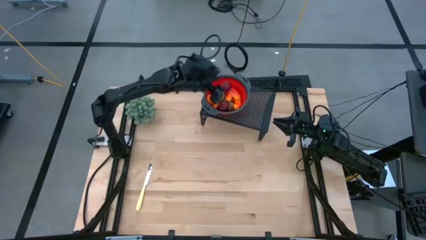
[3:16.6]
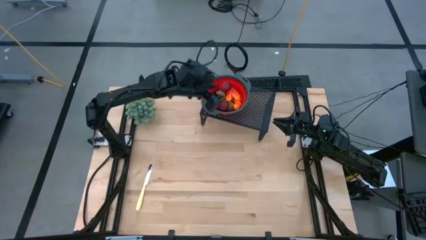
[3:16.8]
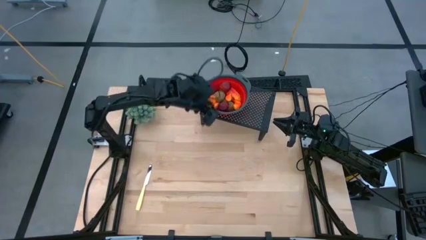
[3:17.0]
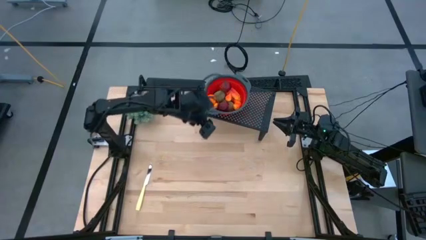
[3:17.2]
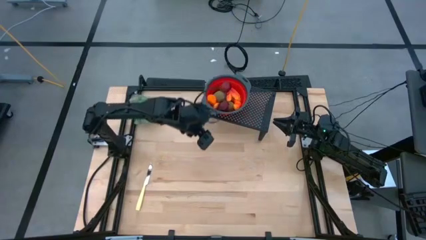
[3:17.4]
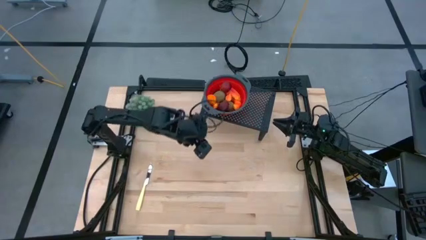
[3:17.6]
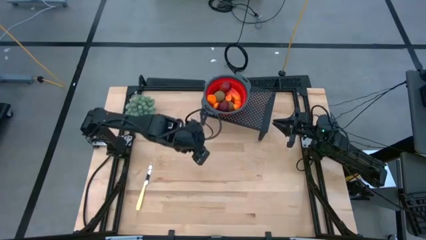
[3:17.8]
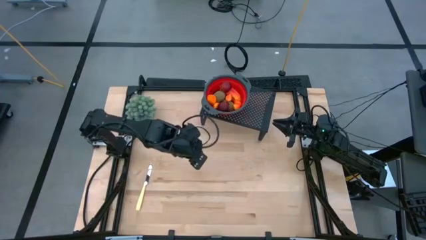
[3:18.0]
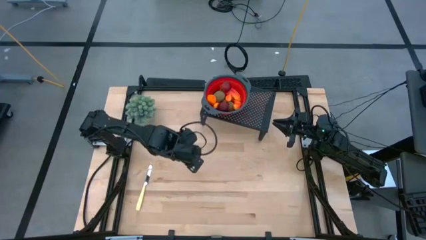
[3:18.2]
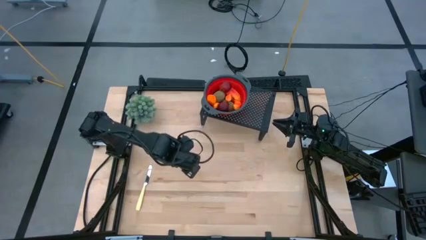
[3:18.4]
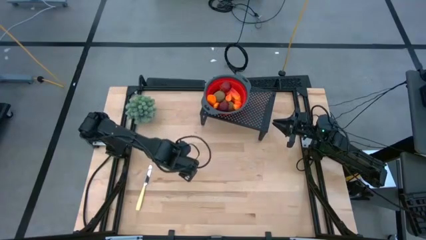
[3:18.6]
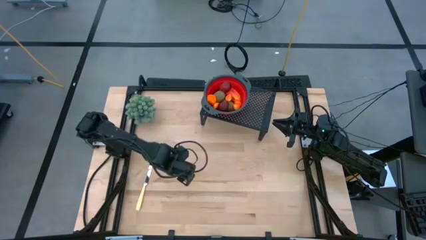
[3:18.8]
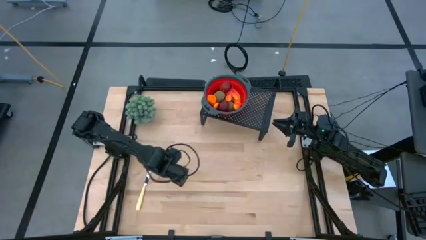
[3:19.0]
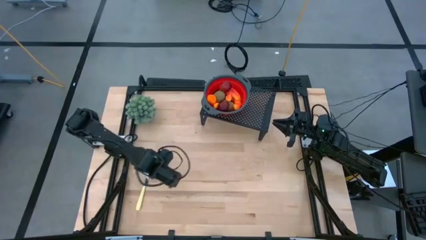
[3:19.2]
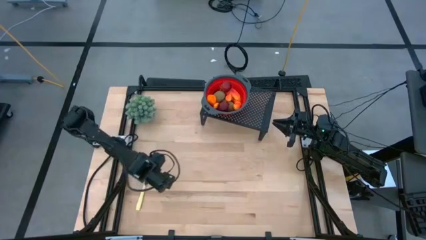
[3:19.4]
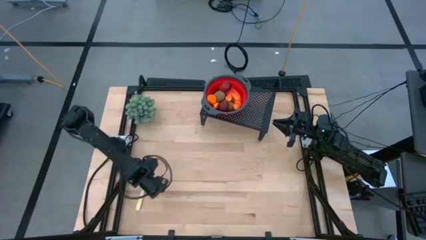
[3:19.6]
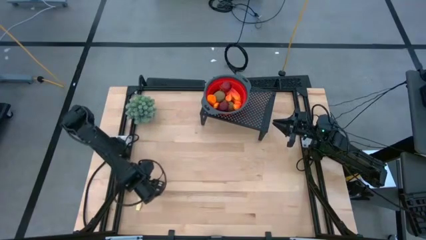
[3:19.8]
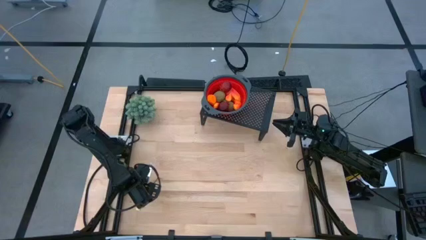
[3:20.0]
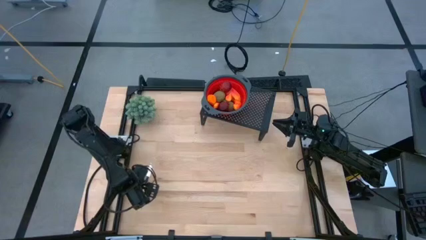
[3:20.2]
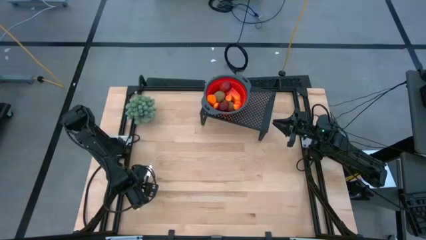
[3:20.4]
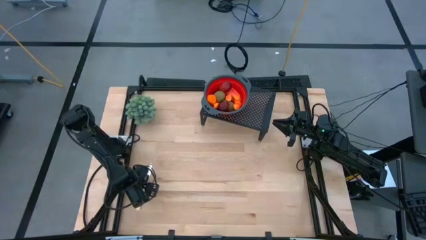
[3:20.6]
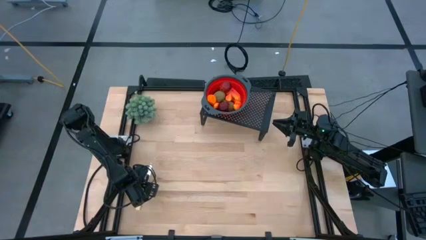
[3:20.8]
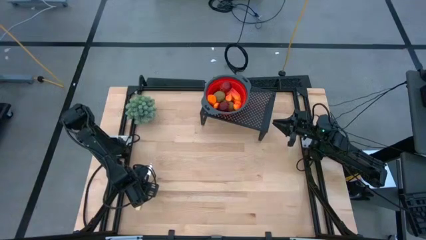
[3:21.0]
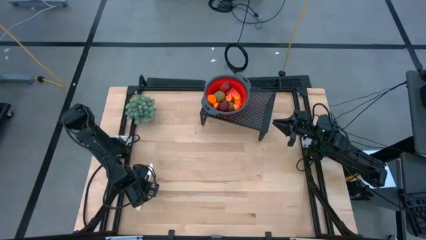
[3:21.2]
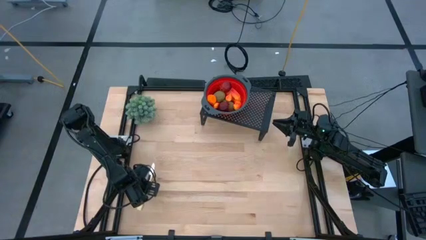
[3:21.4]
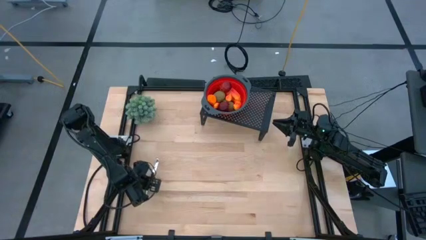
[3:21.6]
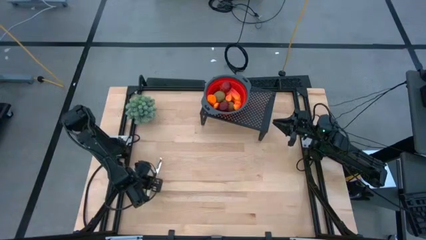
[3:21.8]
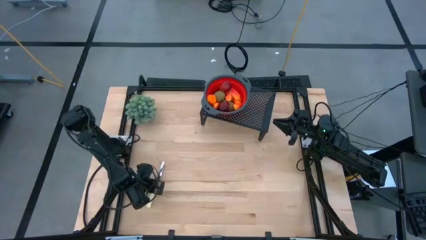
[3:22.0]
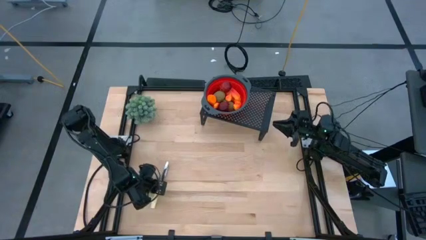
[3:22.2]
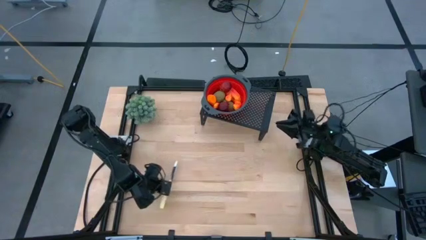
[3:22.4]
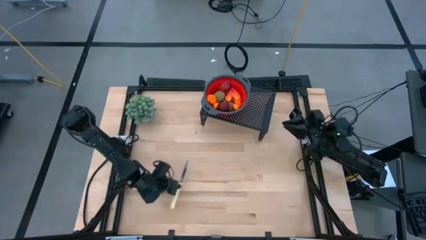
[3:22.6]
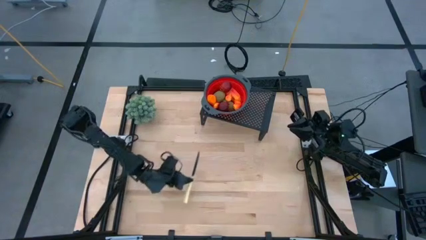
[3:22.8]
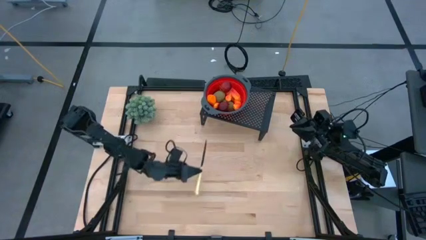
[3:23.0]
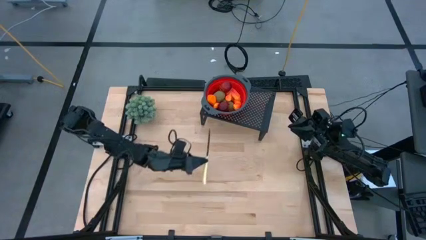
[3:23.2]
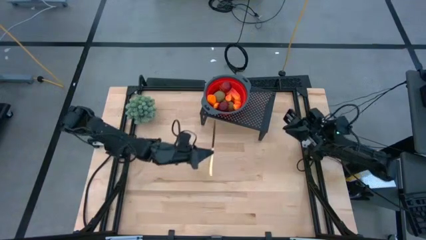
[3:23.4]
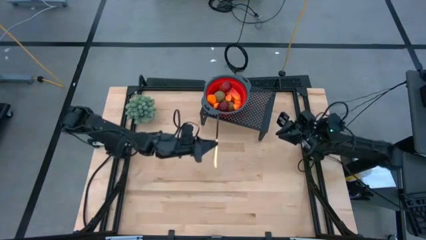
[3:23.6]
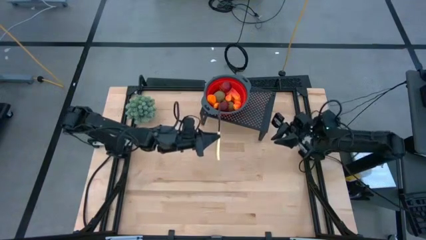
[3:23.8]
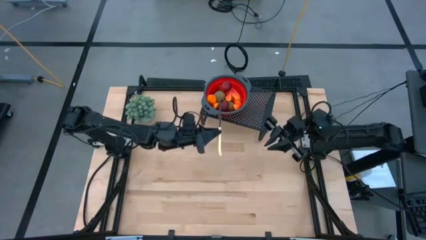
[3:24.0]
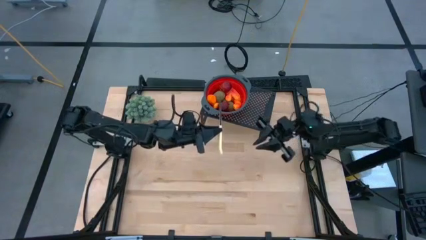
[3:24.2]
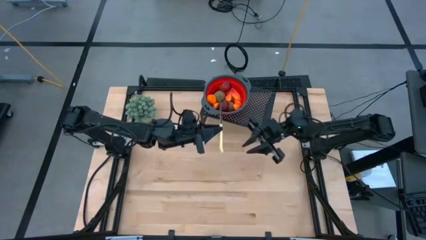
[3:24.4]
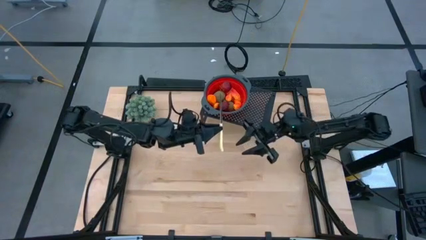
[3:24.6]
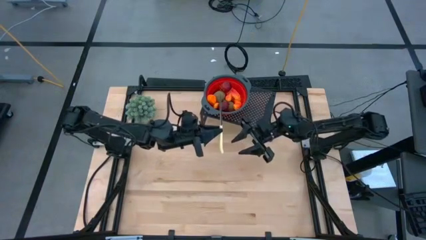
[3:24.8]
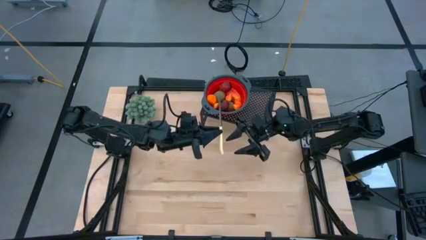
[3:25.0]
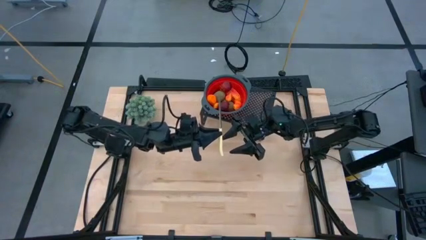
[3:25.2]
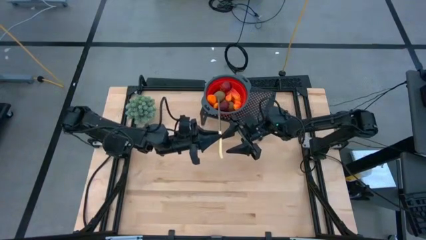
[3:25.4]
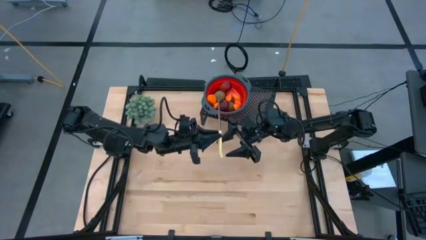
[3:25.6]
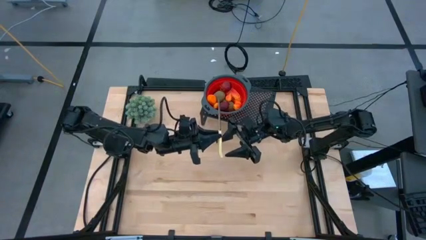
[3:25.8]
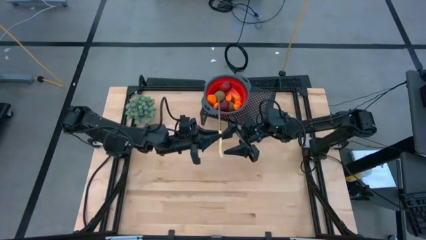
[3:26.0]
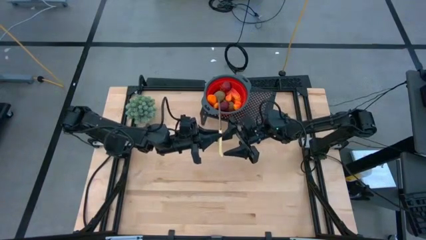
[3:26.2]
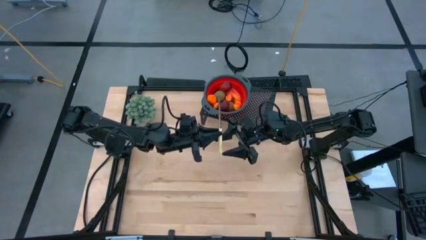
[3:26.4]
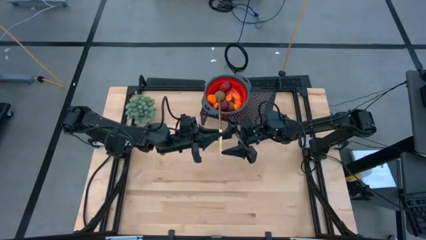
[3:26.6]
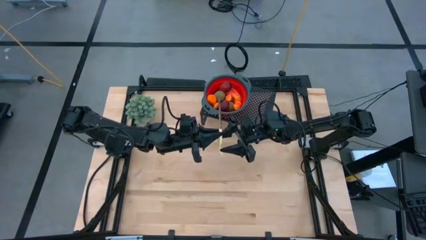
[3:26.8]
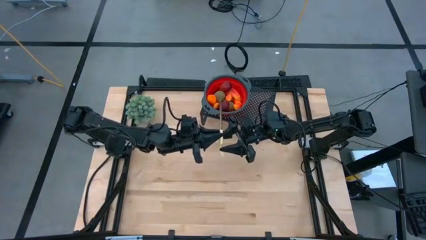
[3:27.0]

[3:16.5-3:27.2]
Task: Pick & Place Fruit
Put the white table knife on the shelf
